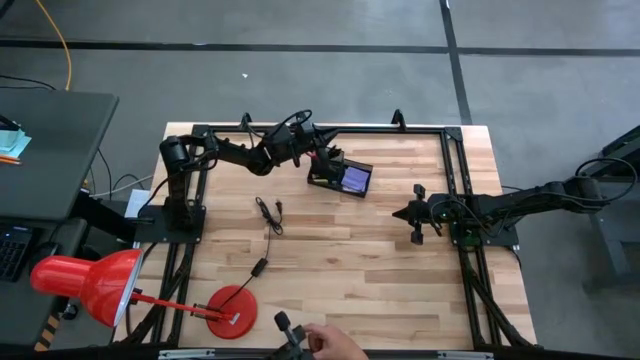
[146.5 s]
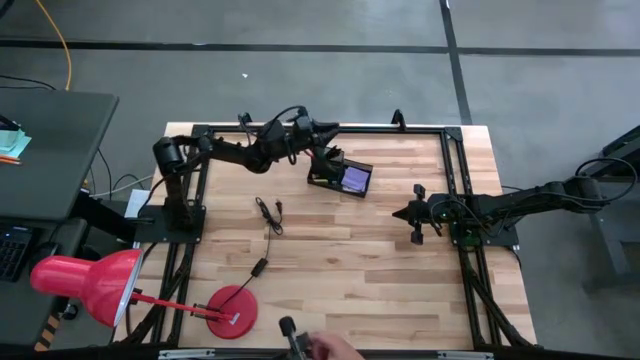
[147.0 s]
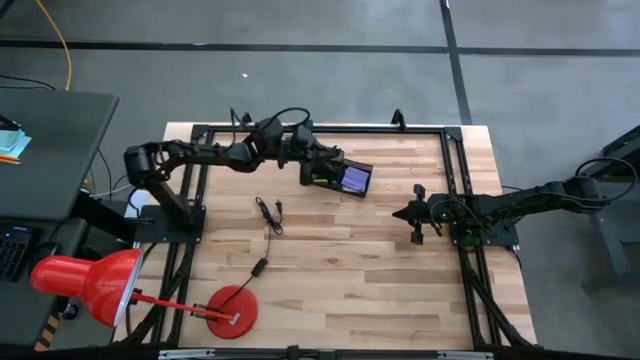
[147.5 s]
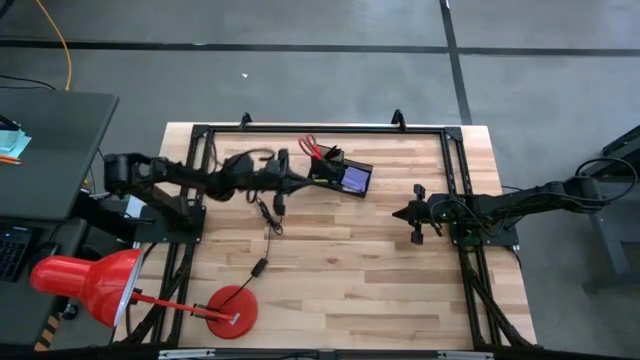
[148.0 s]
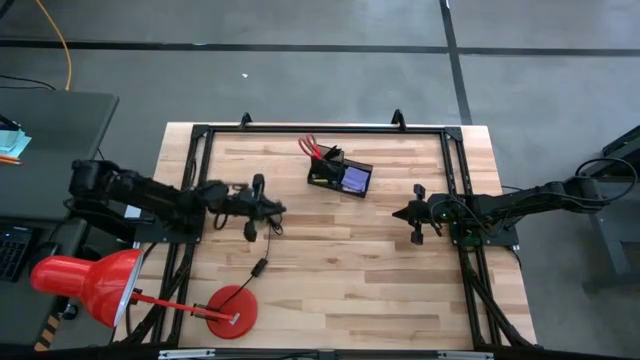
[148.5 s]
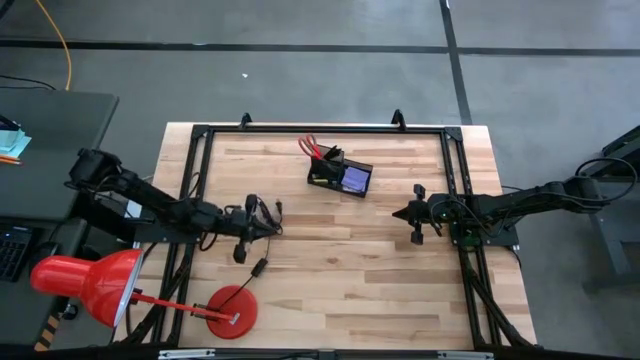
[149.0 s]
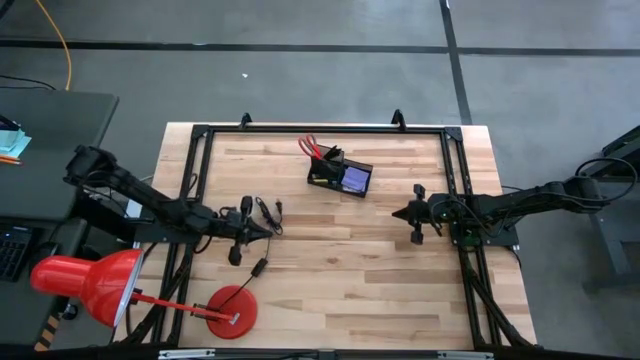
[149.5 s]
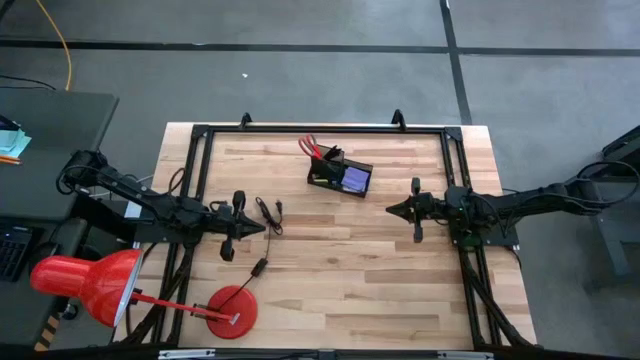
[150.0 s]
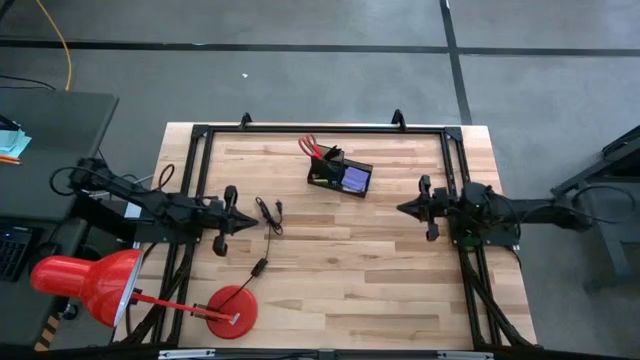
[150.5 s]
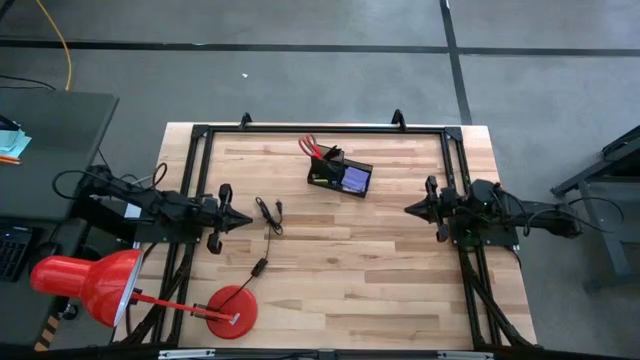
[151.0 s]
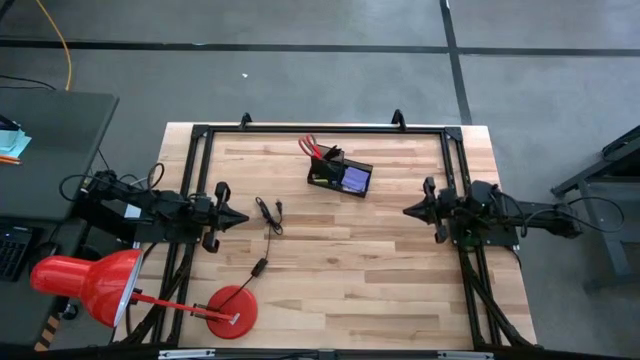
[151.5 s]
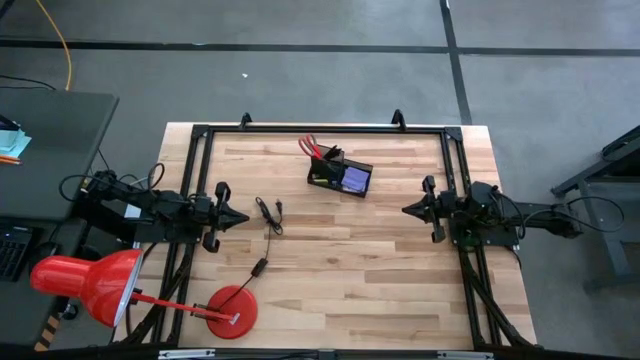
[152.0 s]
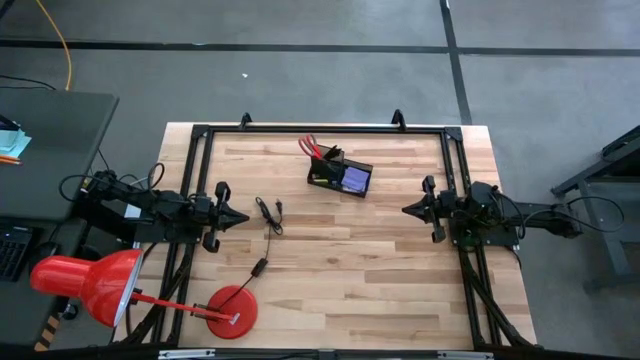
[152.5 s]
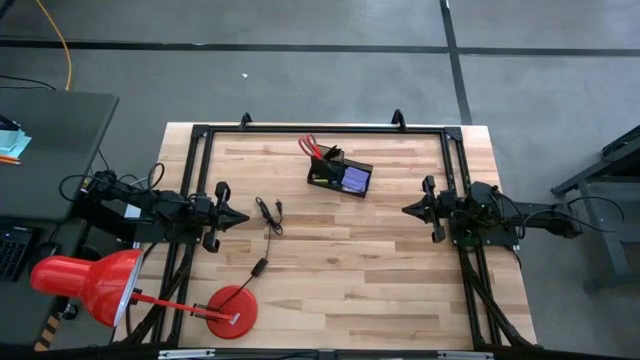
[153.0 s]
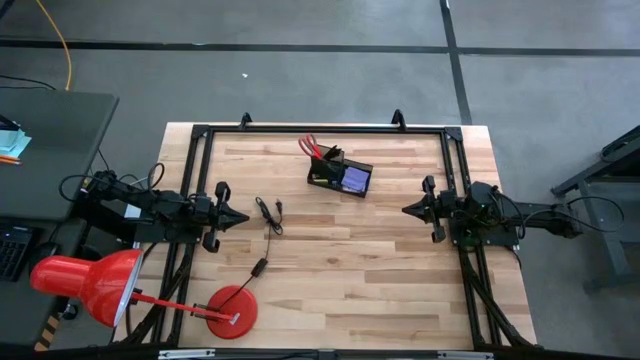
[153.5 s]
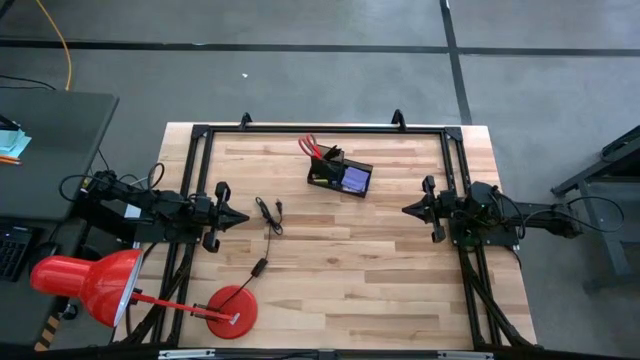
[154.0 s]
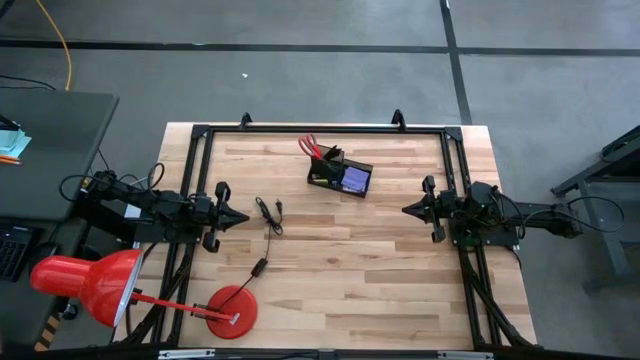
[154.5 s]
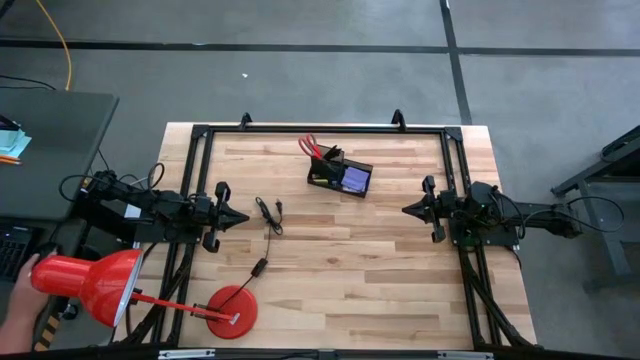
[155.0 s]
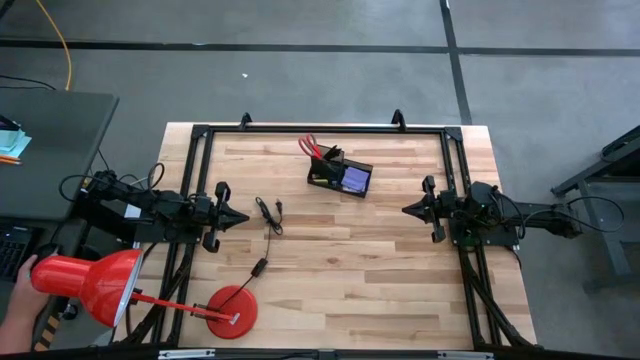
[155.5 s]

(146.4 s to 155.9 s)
Task: Pick and place office supplies into organizer
Return to Home Position

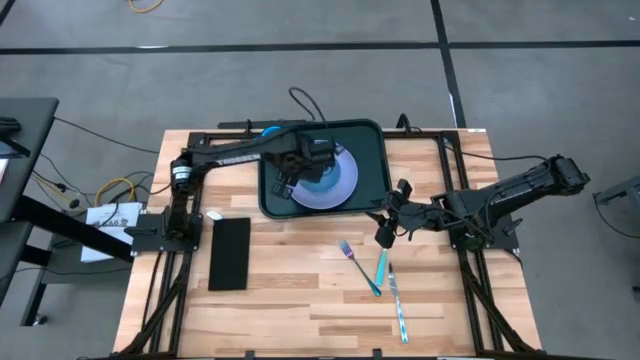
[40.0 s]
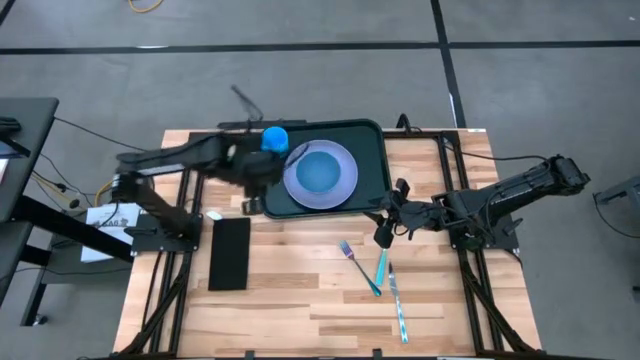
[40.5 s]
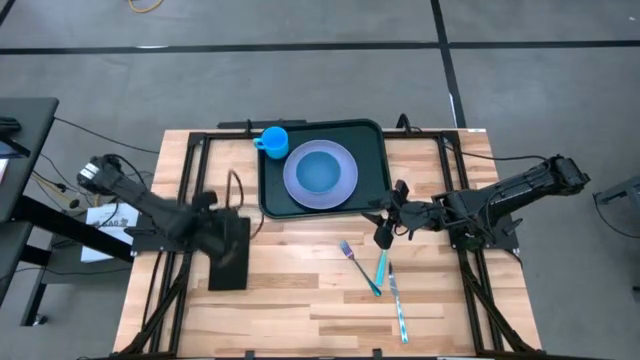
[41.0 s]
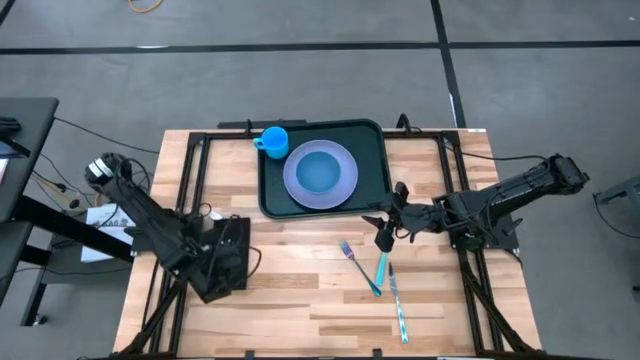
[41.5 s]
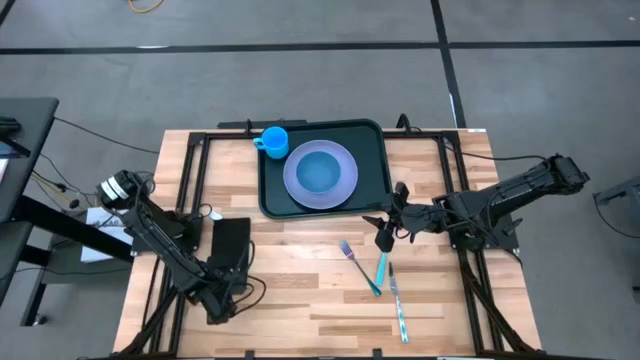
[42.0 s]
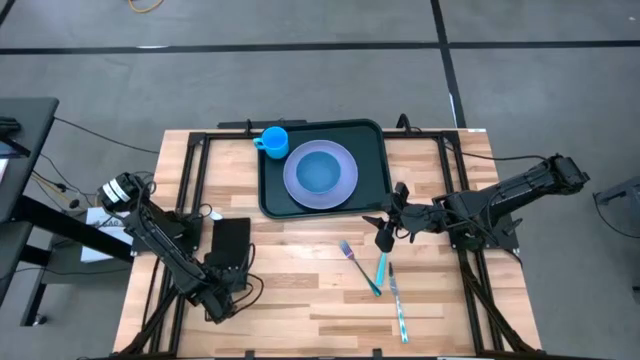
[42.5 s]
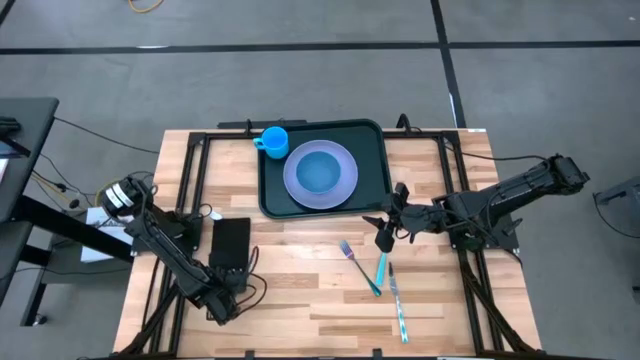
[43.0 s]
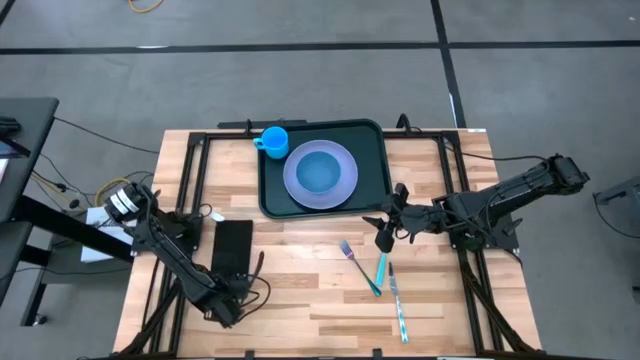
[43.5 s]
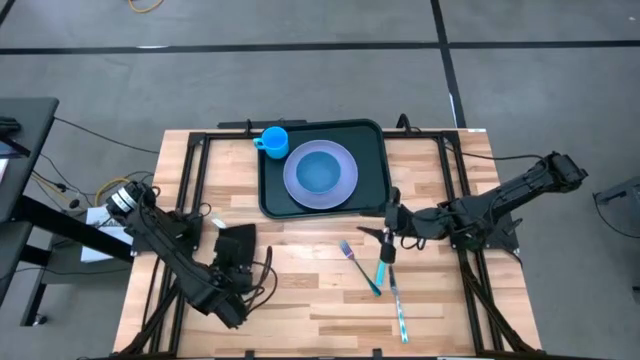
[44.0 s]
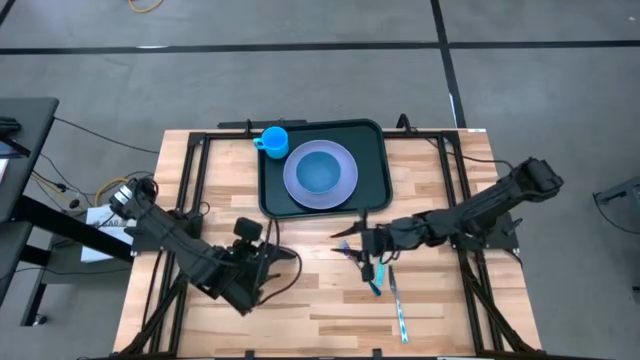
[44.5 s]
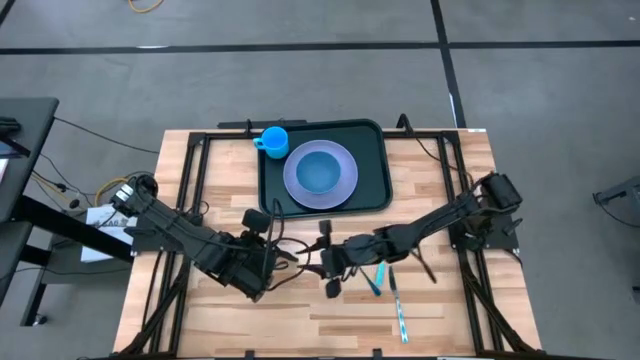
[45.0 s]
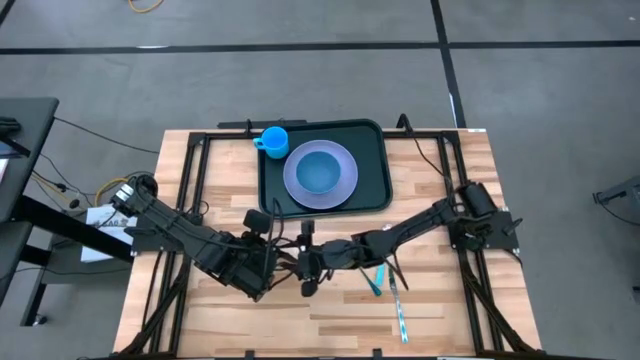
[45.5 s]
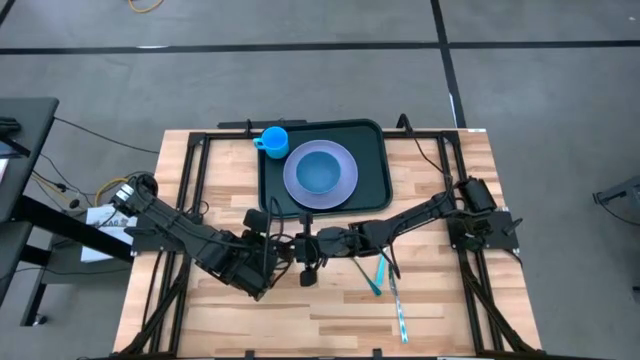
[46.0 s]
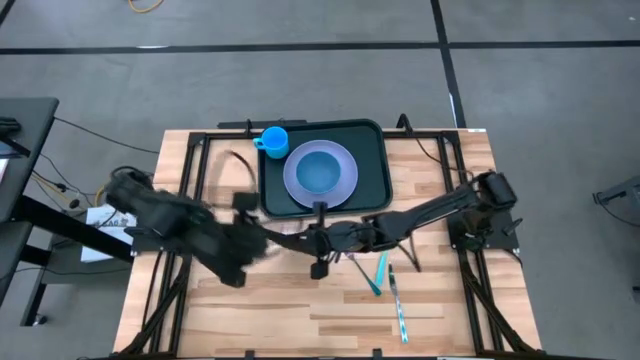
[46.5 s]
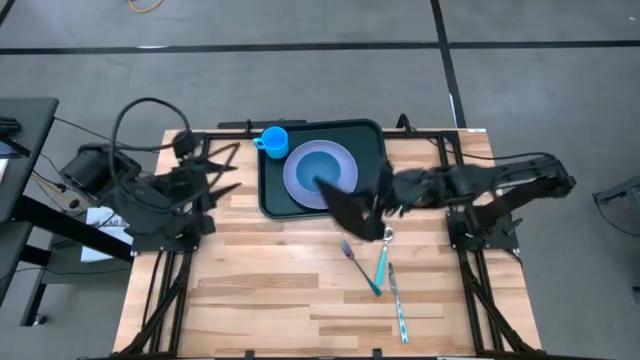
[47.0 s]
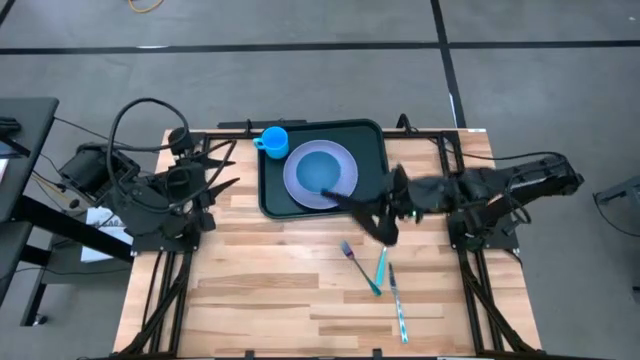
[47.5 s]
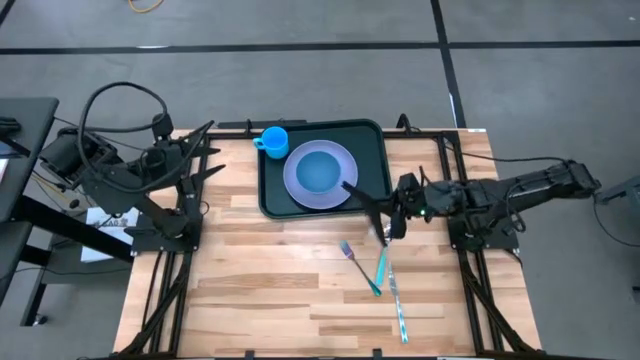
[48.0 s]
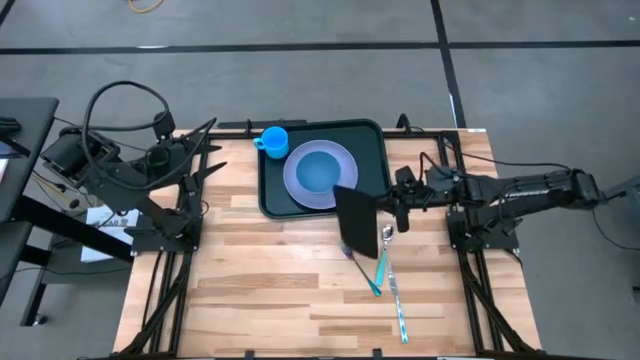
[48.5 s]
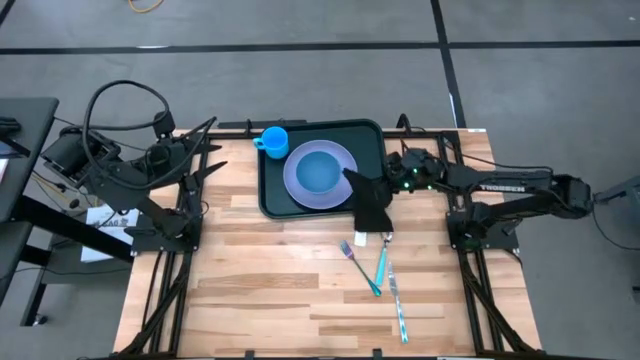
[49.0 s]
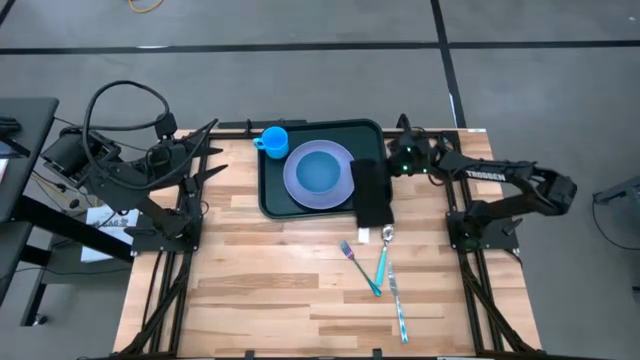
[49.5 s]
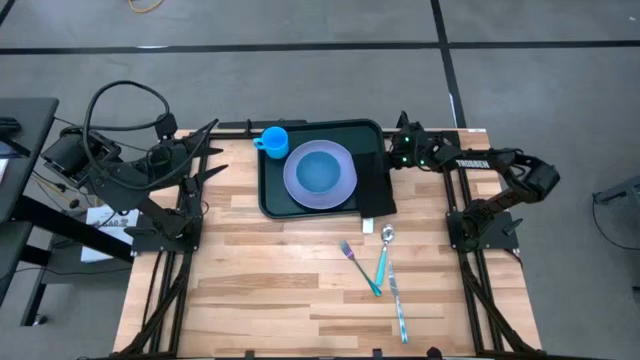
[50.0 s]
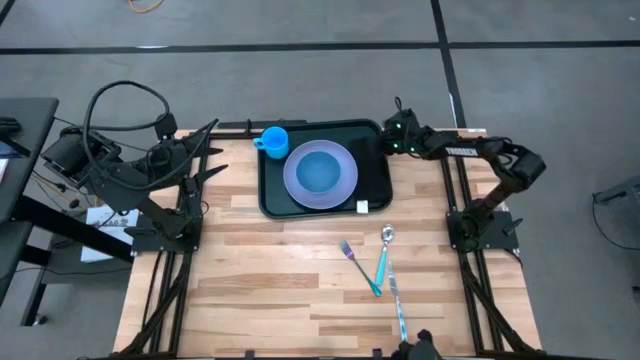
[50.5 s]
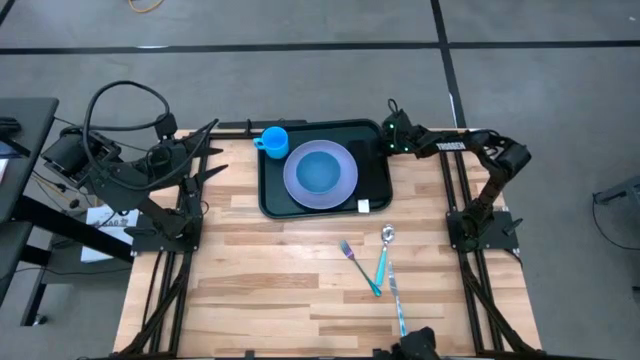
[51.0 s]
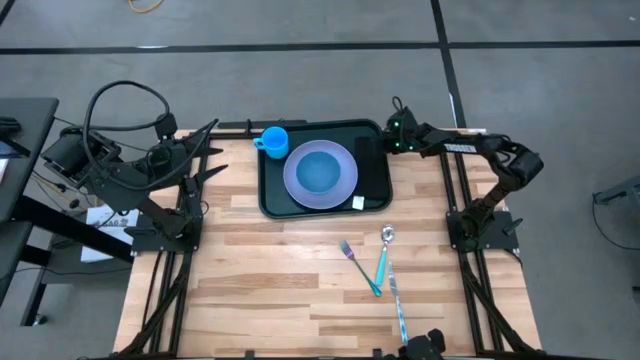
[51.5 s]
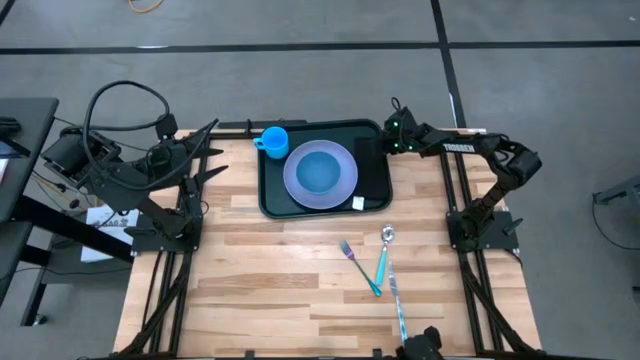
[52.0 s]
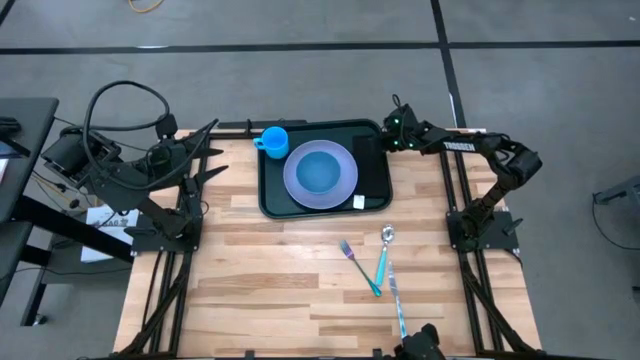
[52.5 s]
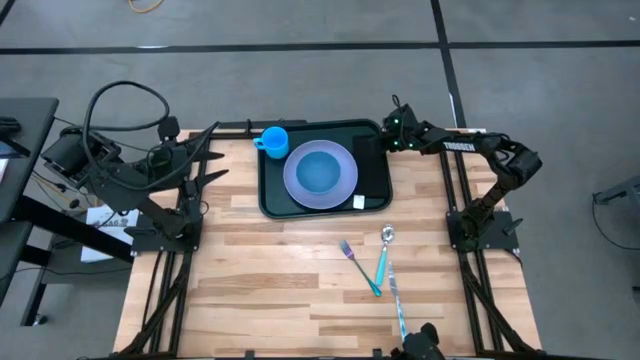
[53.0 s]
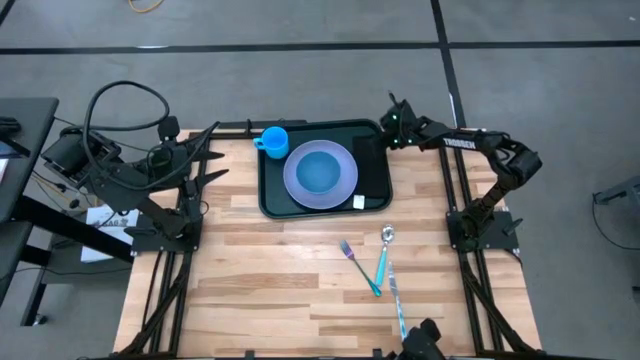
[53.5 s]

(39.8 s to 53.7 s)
Task: Set up tray
Put the black napkin on the black tray to the right of the purple plate
